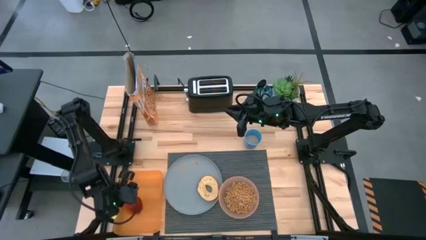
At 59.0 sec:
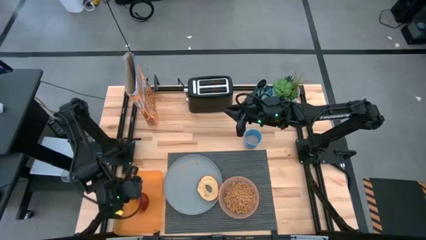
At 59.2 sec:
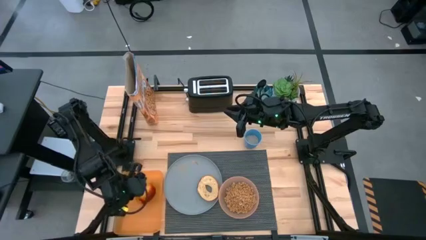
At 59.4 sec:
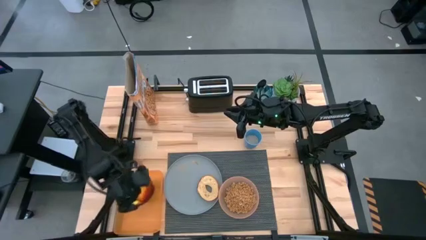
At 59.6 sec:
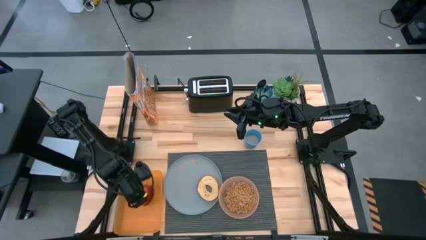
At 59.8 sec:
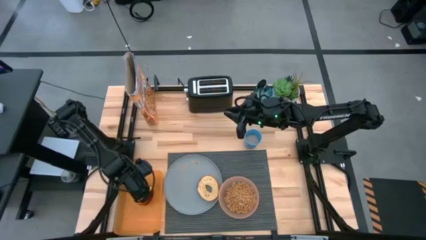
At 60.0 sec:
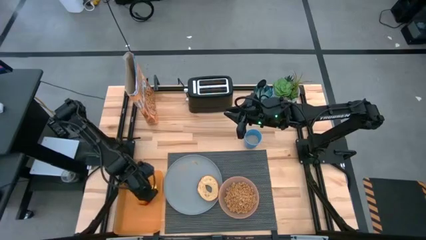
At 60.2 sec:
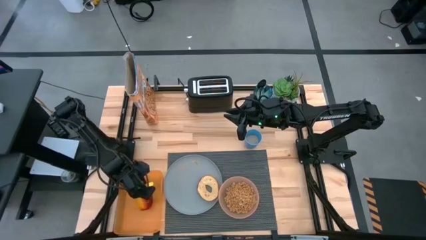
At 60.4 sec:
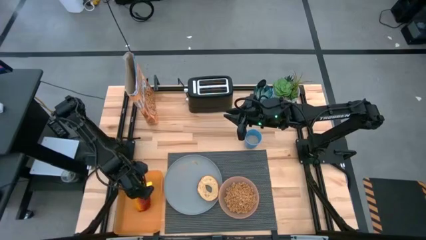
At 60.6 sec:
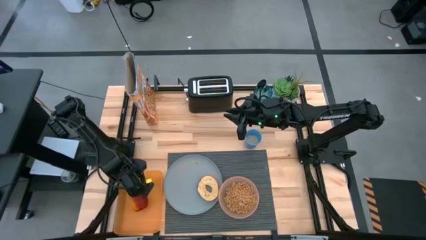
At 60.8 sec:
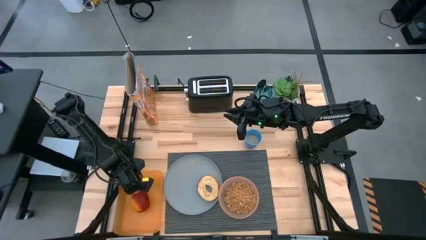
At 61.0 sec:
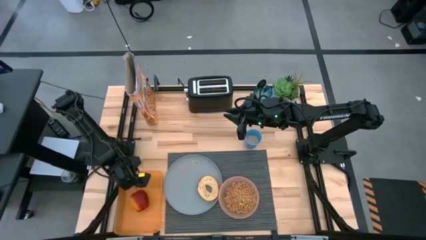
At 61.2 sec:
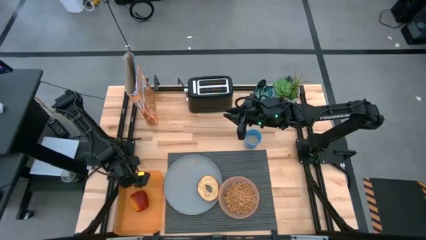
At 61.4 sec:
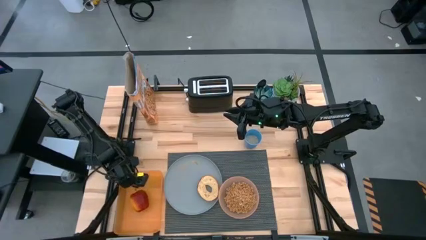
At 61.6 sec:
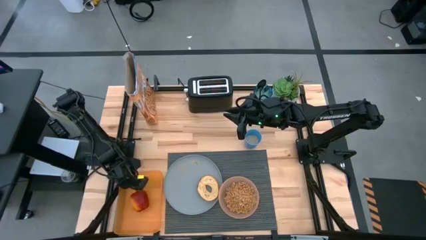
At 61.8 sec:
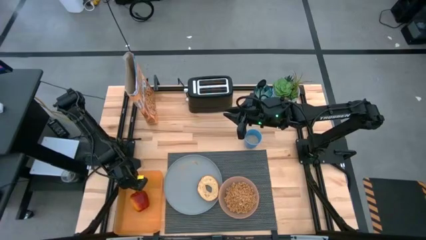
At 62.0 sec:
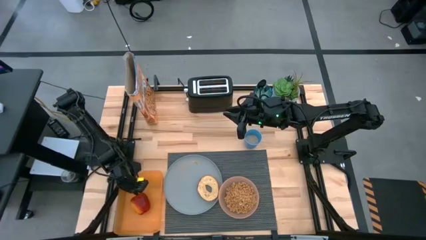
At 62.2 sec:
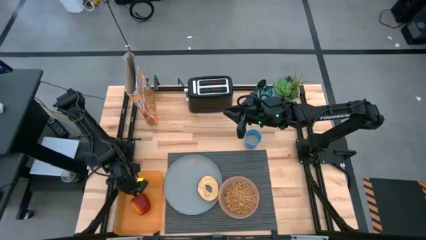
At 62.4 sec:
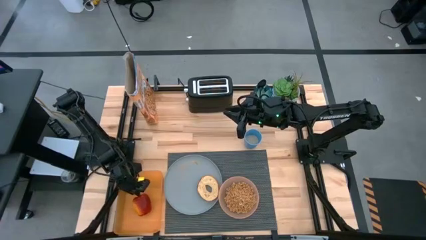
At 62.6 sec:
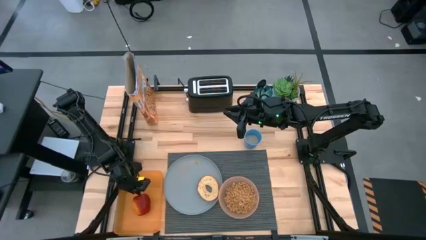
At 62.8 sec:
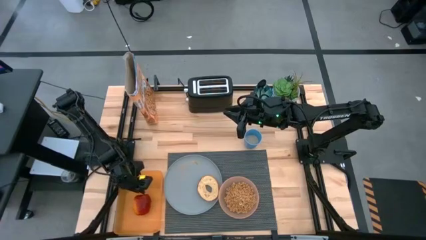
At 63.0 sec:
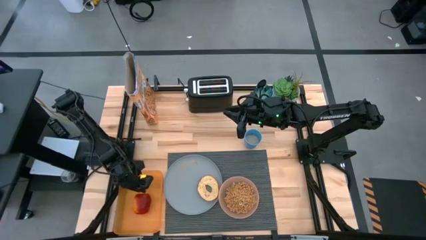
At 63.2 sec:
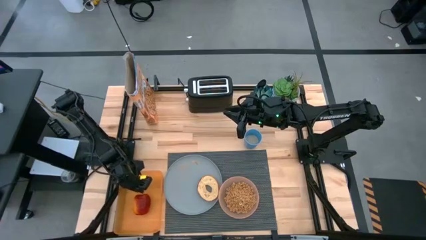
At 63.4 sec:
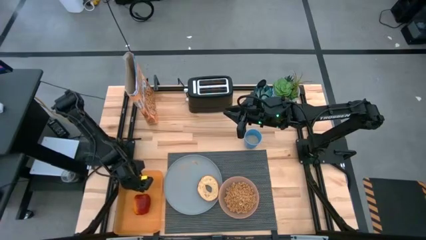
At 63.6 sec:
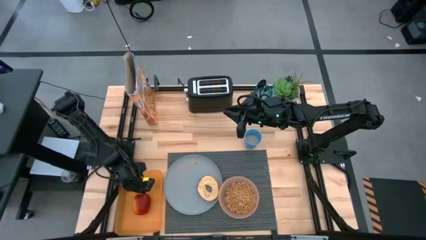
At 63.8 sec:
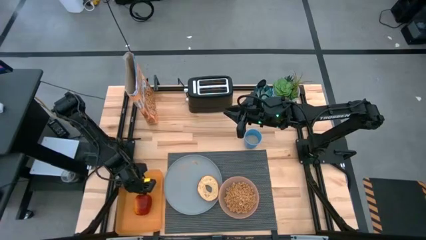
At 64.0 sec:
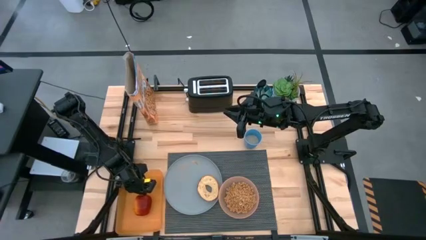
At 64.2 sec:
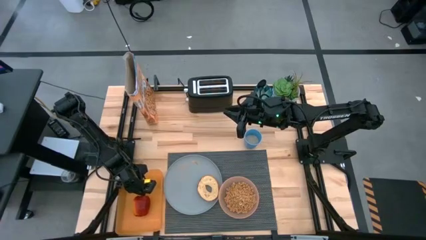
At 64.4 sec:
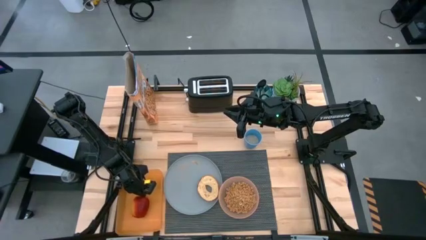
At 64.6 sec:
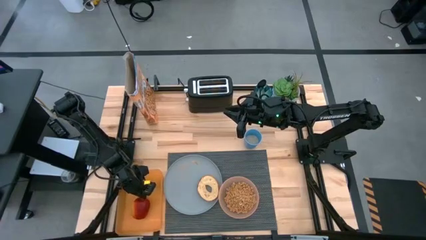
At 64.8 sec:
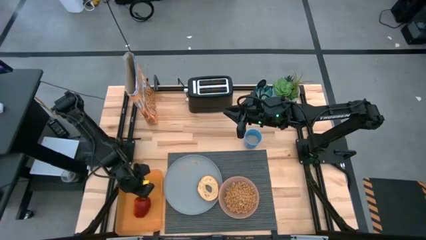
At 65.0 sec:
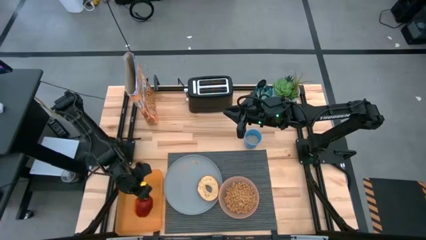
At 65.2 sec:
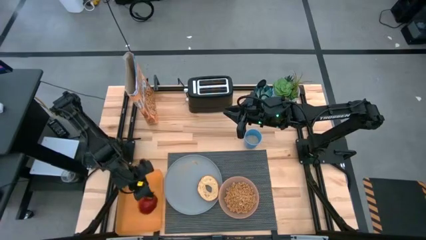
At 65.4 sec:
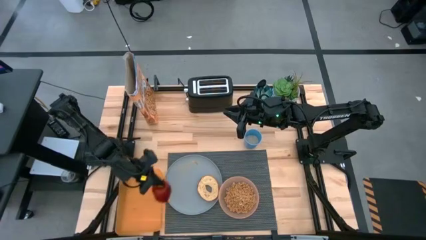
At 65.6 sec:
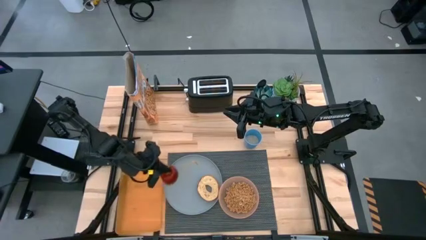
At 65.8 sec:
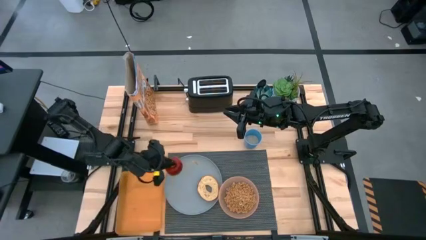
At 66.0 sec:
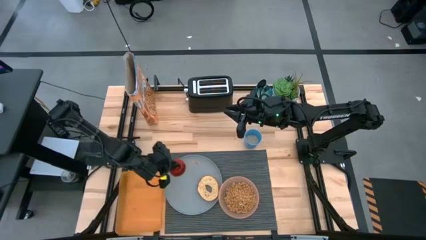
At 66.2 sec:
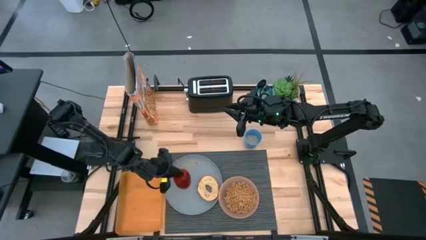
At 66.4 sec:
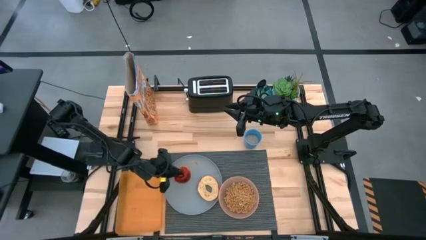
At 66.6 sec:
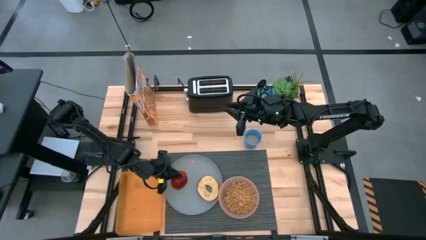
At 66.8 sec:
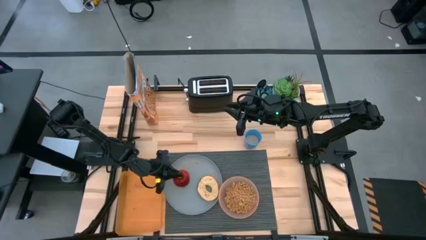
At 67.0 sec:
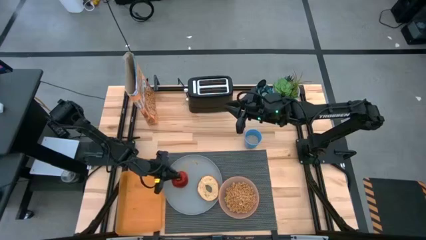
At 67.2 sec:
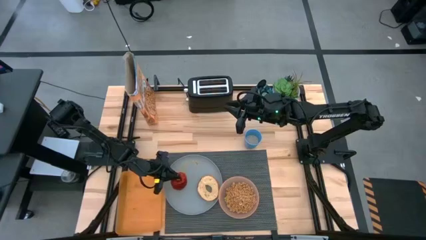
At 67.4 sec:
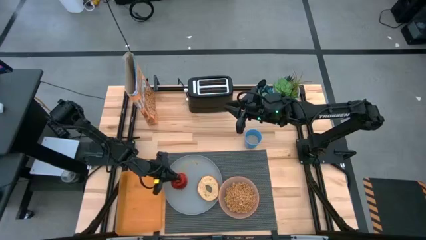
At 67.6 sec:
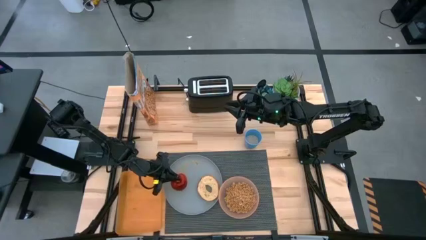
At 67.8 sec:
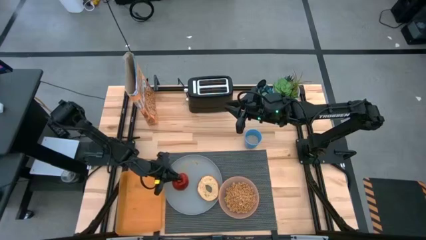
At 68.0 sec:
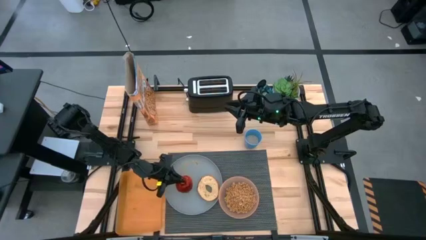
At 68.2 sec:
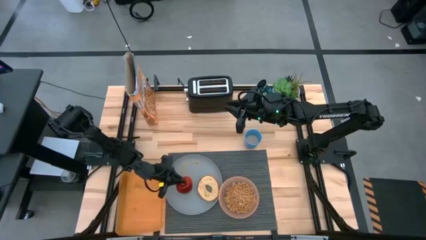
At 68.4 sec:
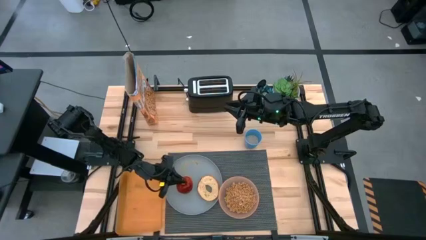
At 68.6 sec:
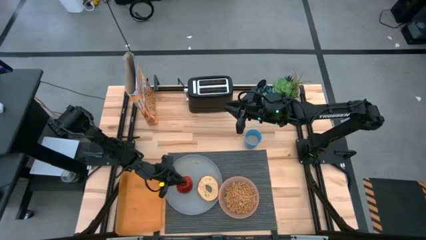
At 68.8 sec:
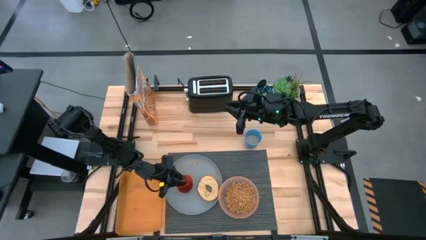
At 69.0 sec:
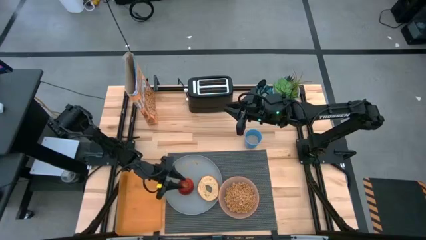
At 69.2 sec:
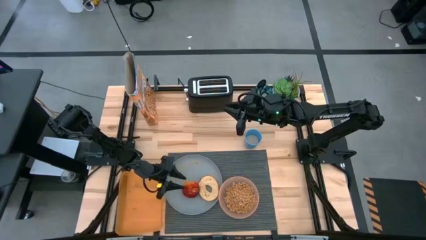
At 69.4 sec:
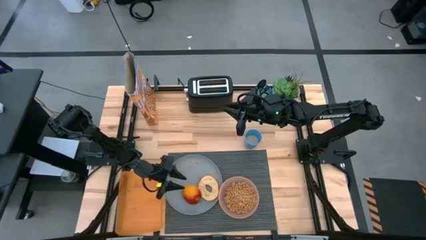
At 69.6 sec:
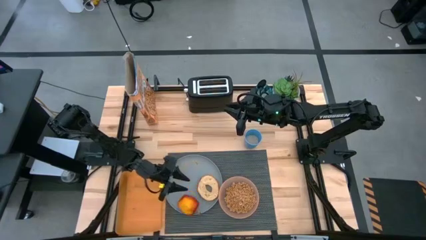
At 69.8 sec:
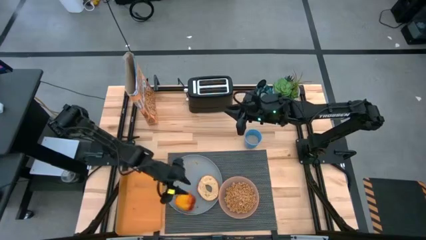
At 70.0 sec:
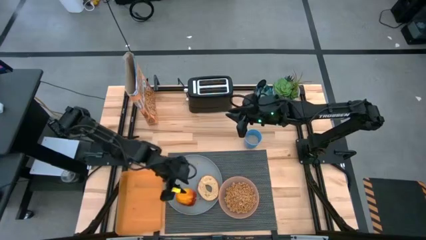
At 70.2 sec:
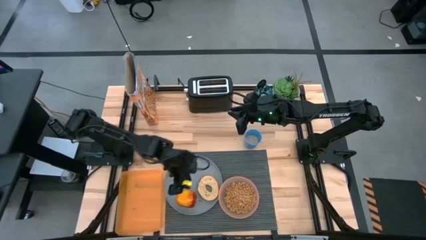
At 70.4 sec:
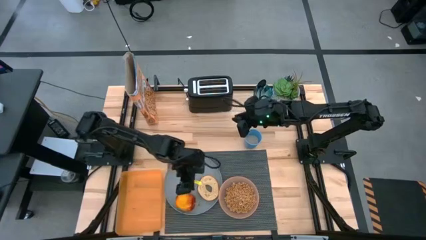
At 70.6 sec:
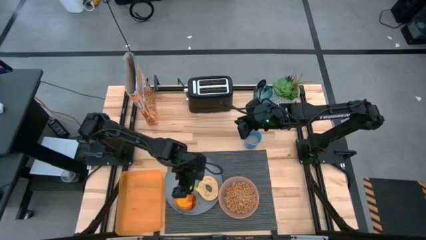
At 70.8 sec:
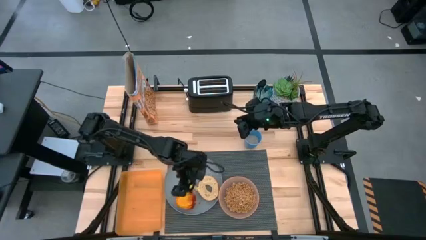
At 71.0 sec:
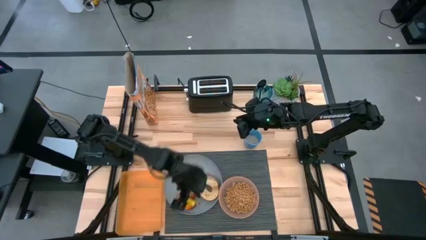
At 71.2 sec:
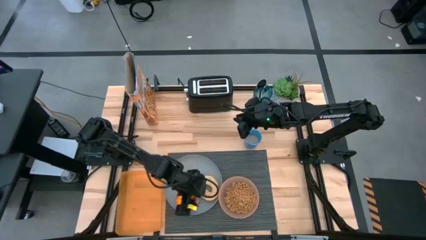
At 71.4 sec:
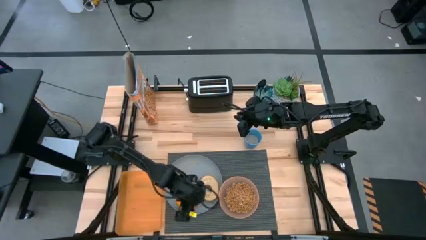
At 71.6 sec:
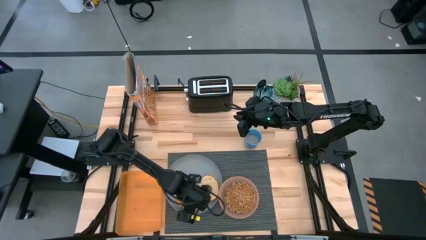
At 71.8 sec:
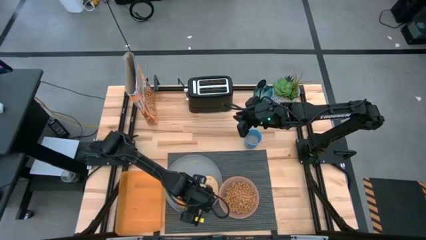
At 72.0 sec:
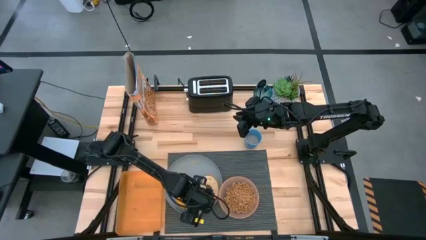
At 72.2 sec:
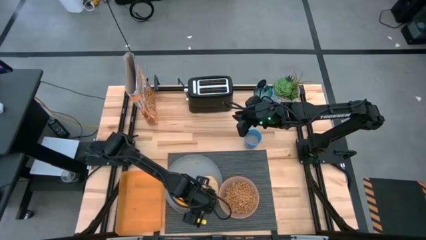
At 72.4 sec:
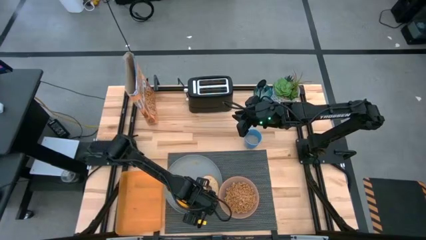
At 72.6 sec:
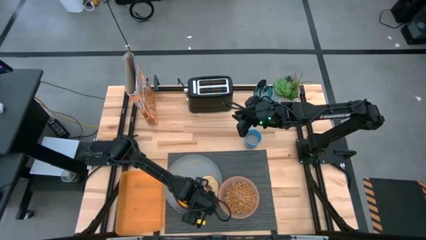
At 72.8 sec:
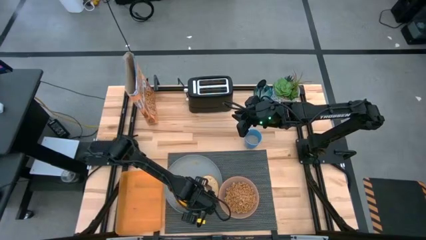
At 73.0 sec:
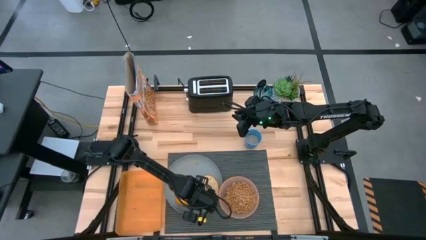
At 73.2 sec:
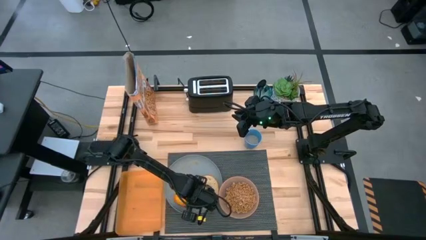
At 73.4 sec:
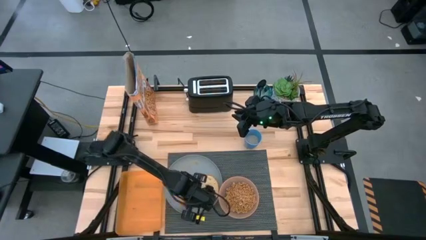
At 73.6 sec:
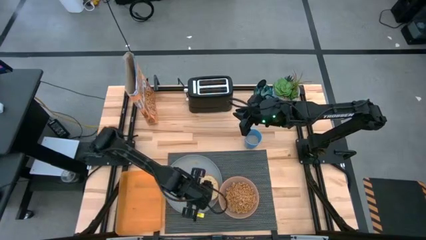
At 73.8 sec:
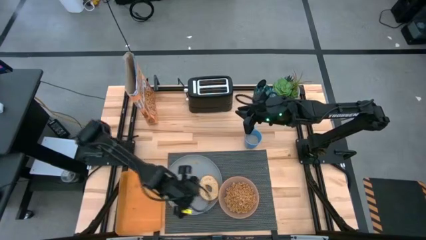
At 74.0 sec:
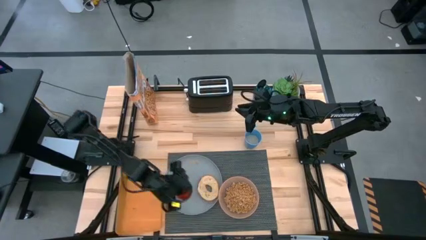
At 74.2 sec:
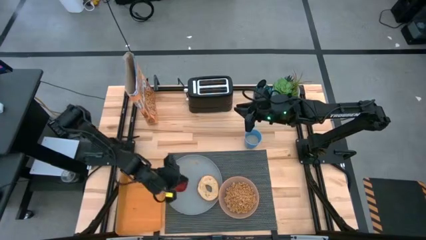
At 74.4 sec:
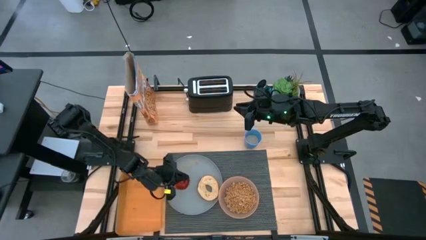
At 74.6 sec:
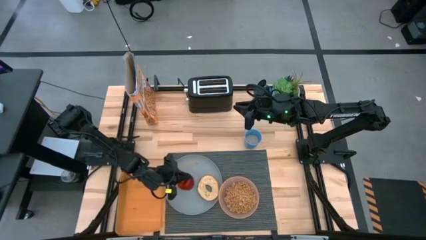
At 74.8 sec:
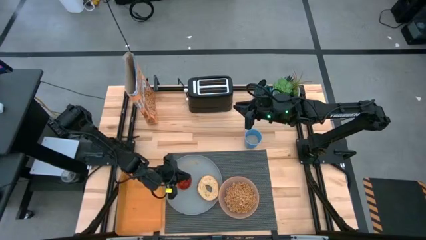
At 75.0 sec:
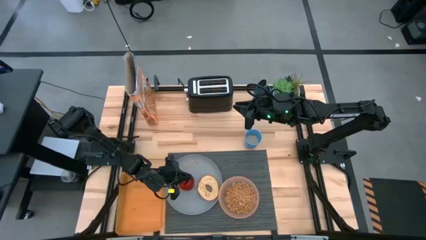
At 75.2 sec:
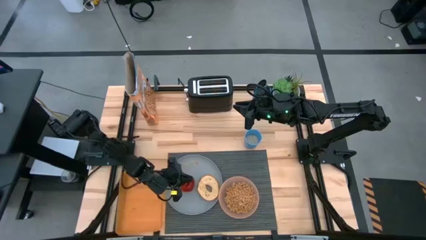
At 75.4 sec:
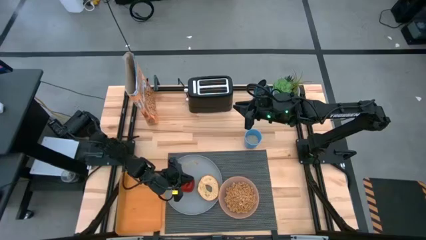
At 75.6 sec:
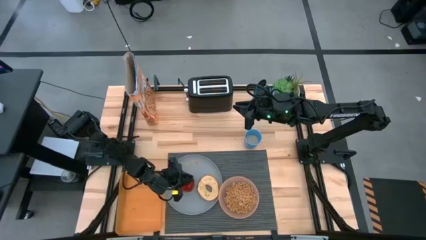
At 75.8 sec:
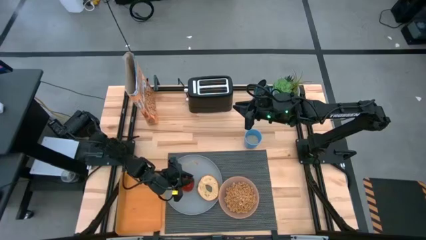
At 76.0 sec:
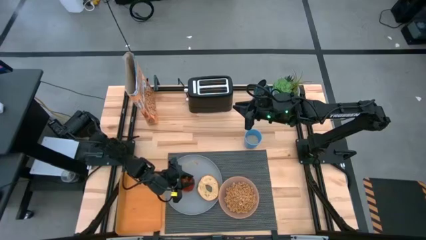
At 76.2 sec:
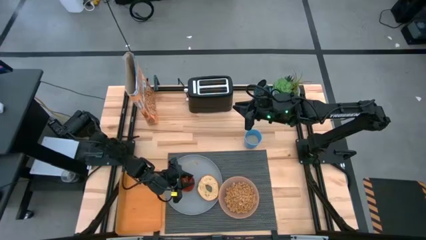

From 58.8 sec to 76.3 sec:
Task: Arrange a breakfast setting
Put the red apple on the gray plate
